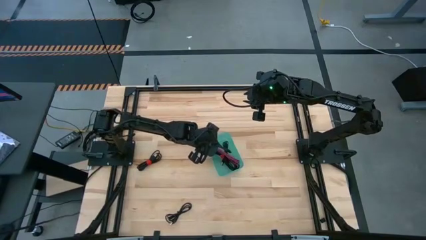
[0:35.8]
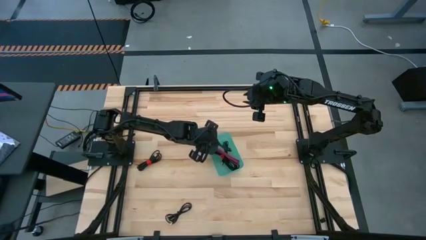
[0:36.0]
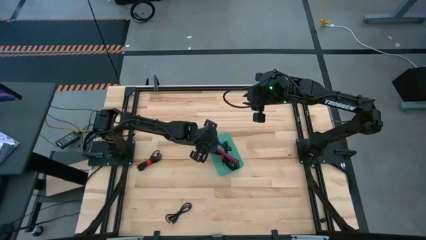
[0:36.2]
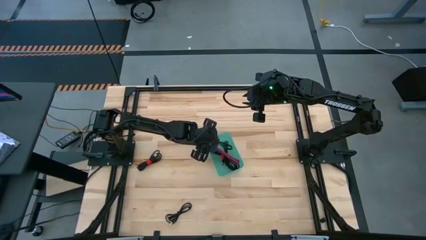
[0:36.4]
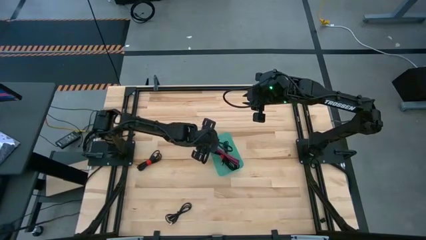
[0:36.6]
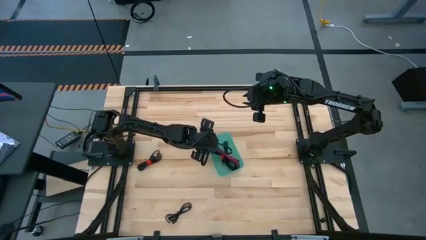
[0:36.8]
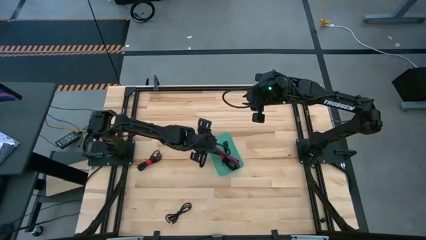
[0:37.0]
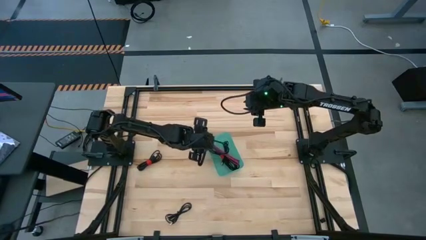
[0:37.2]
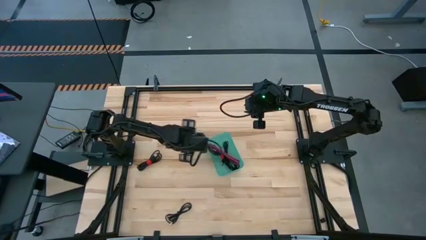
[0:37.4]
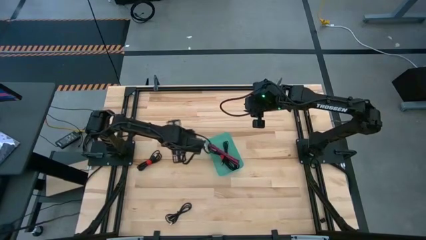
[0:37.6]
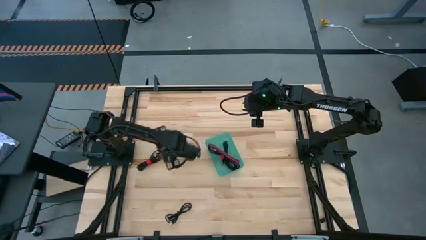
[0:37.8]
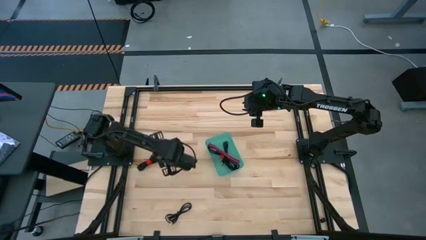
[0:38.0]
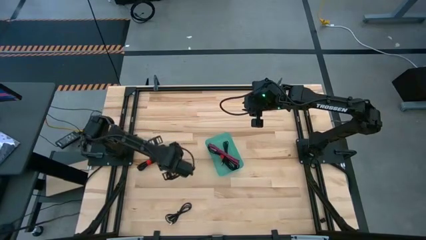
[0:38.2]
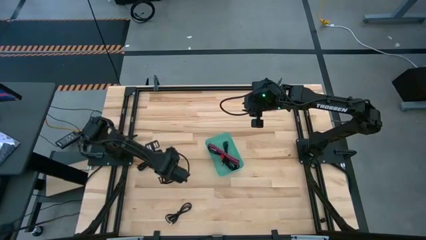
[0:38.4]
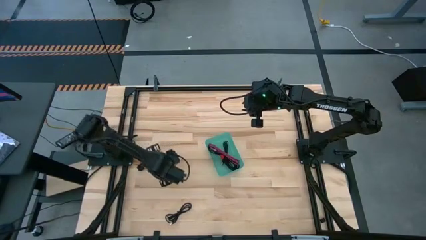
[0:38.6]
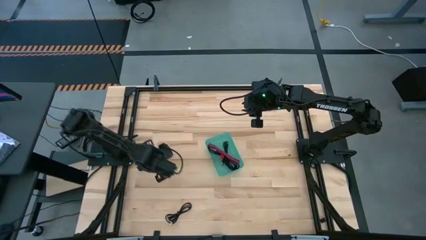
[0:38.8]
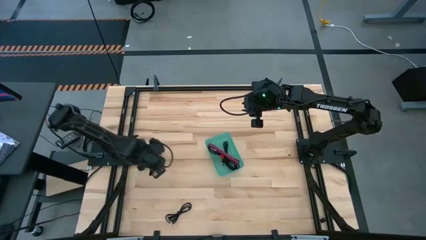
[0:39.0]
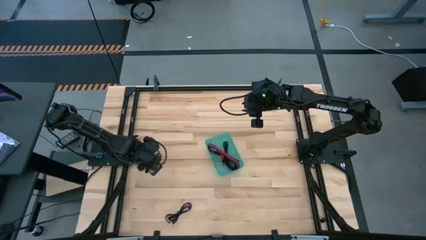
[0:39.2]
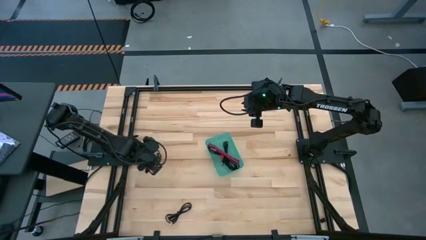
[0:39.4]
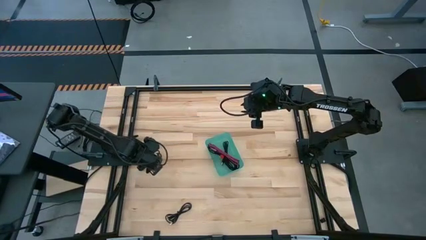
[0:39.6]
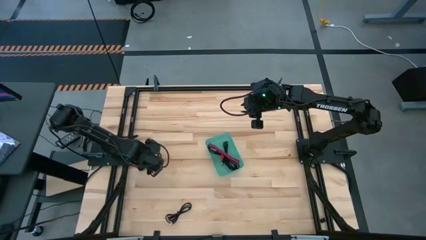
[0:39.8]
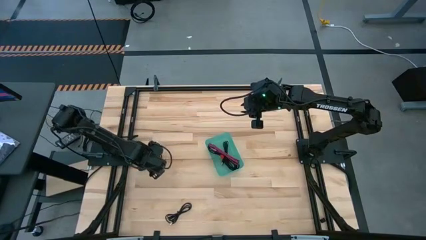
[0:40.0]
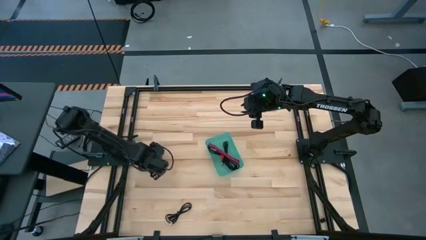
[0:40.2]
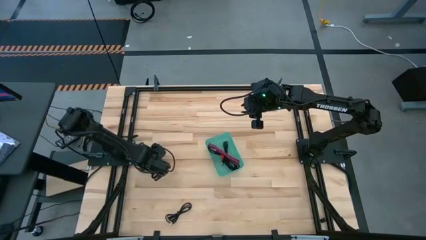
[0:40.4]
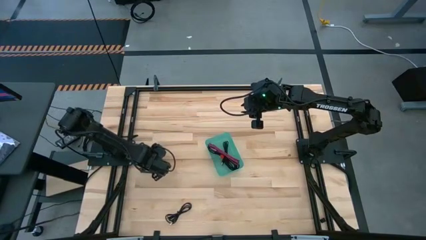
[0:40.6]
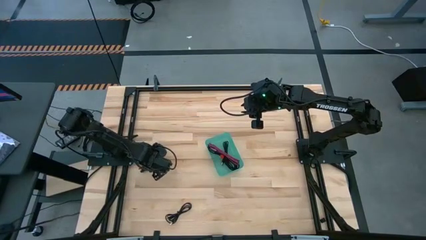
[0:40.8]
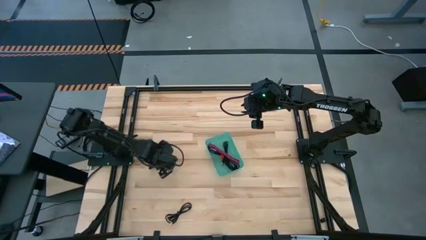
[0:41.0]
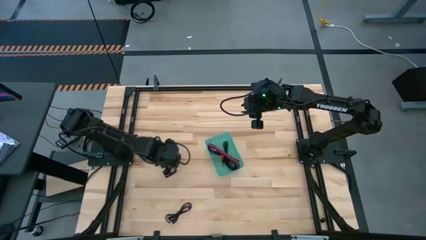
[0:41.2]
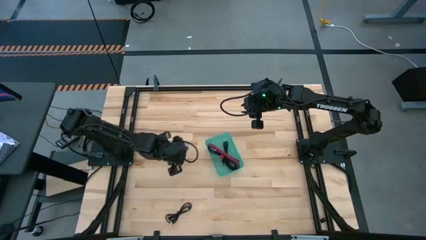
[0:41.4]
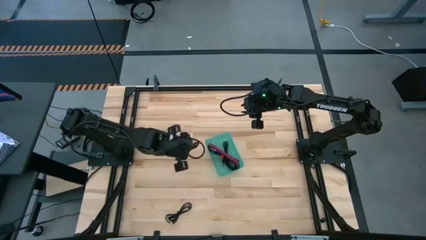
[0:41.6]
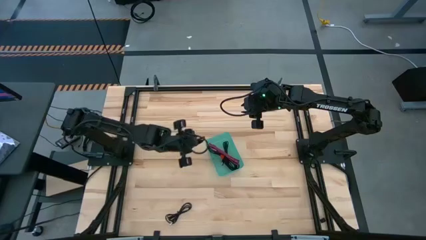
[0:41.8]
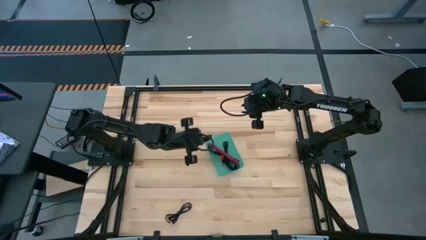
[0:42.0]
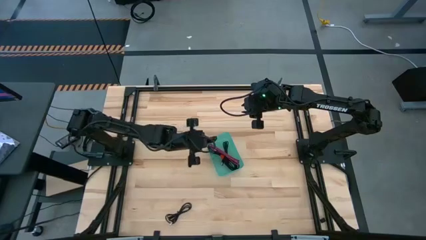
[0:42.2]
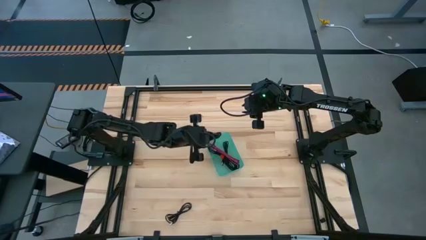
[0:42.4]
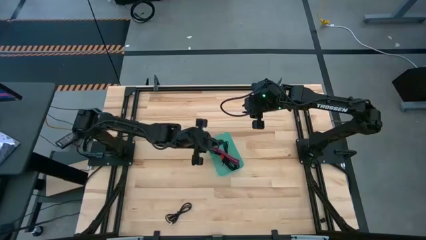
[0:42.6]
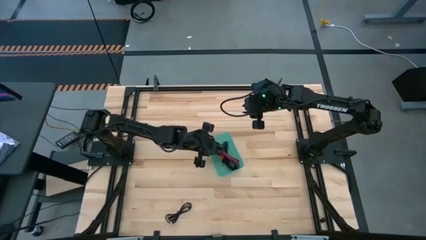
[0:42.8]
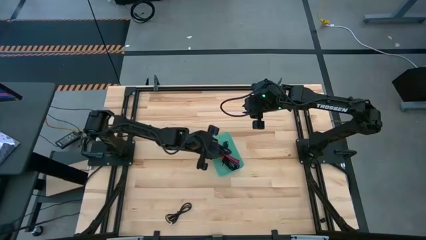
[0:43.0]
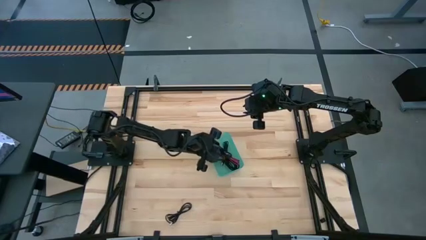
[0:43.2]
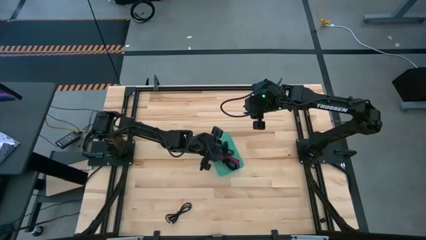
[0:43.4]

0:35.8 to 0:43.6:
Task: Pick and place USB-C Cables
Put the top black charger cable into the green bin

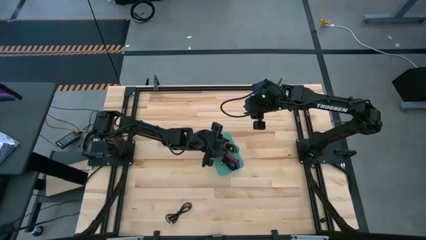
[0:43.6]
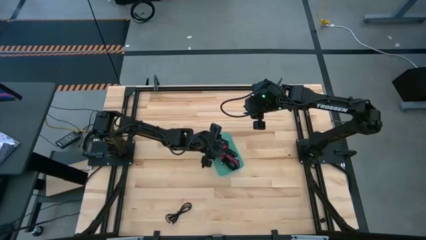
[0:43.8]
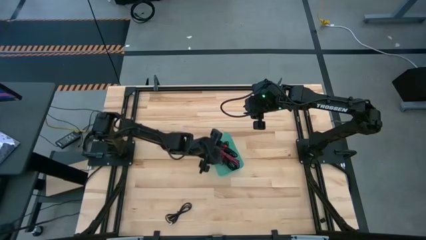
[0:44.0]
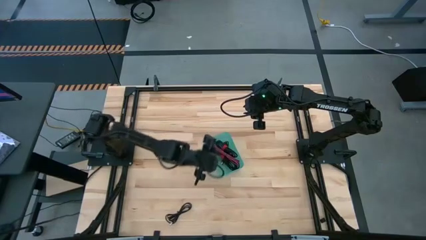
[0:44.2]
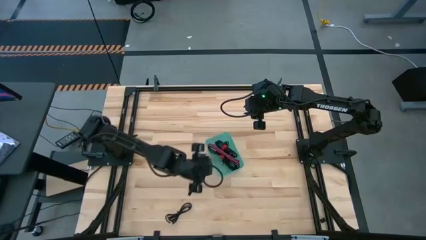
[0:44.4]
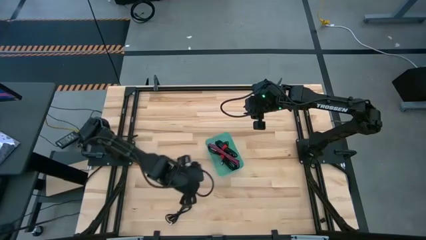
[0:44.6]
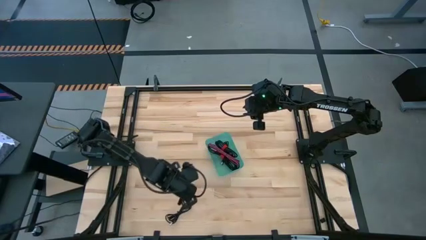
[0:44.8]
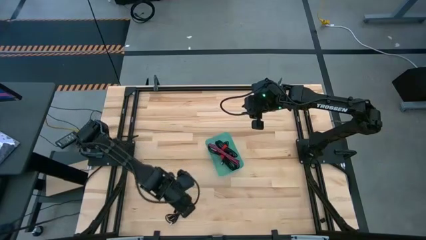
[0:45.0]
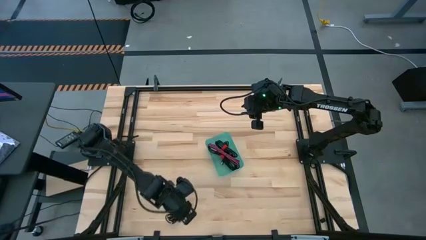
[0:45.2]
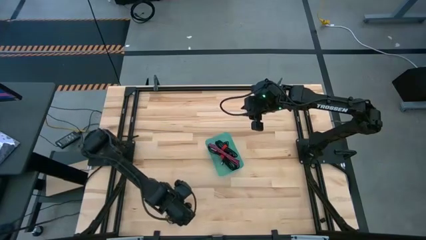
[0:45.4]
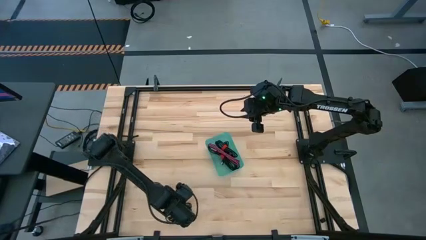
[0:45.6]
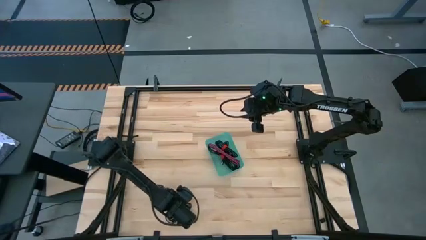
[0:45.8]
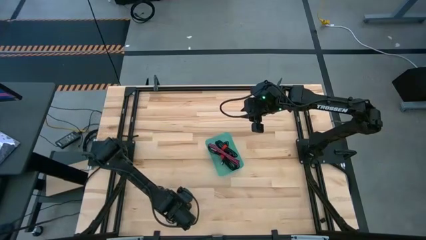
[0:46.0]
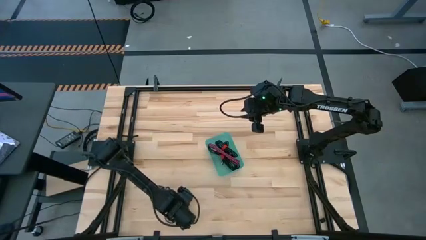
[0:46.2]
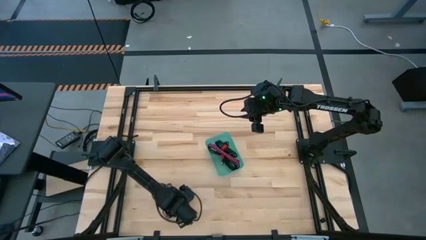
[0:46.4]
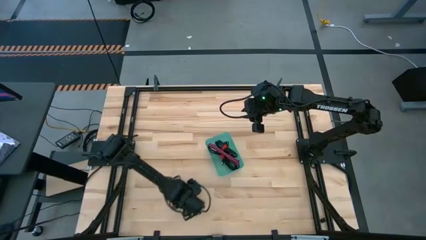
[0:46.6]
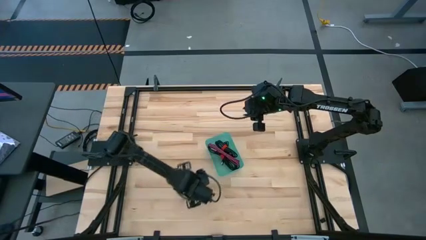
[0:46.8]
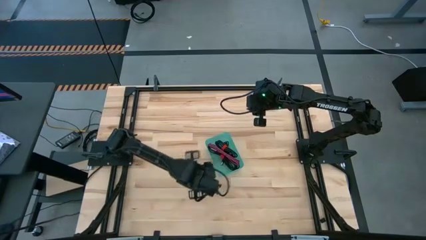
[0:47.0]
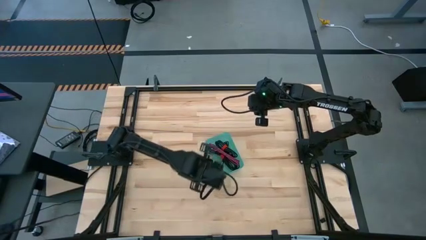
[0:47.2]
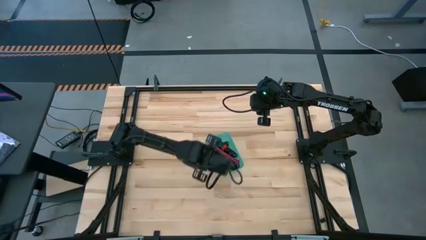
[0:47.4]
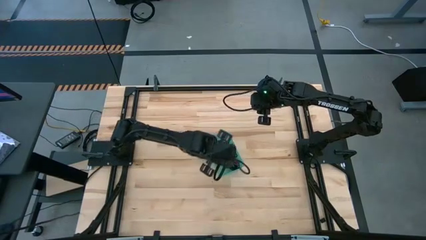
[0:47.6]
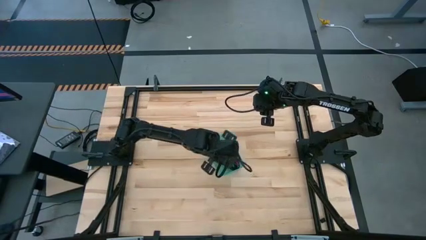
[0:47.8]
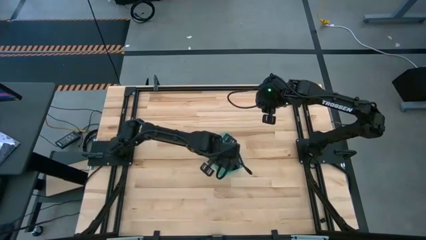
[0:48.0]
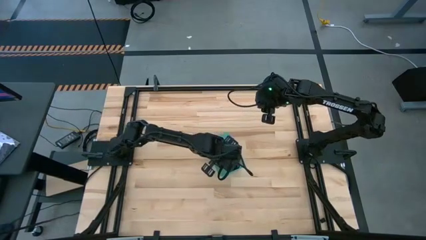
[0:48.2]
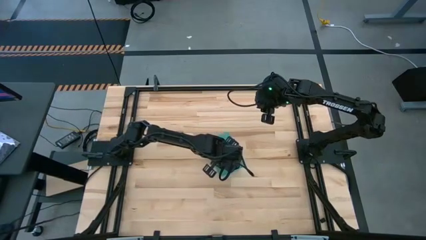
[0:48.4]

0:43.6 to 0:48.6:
Put the black charger cable into the green bin

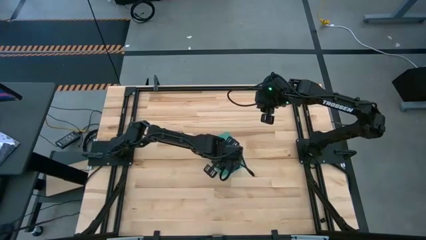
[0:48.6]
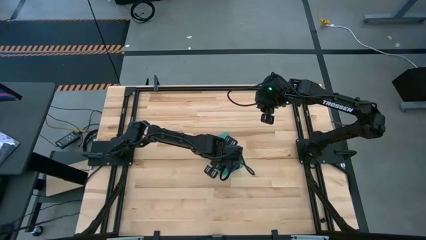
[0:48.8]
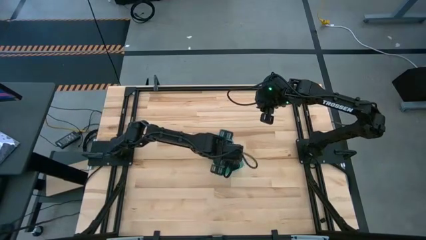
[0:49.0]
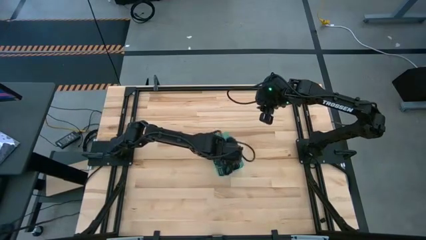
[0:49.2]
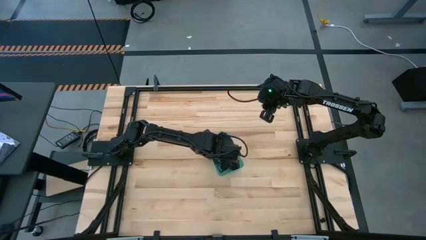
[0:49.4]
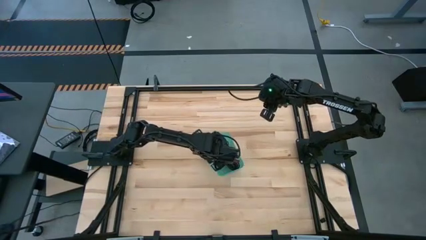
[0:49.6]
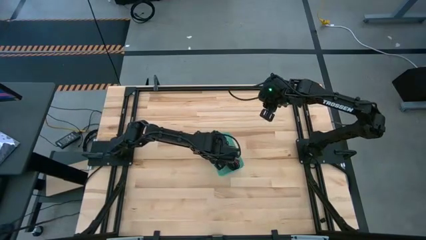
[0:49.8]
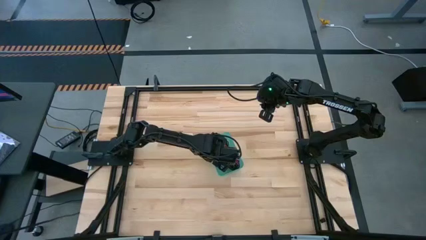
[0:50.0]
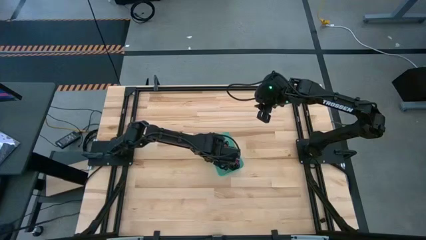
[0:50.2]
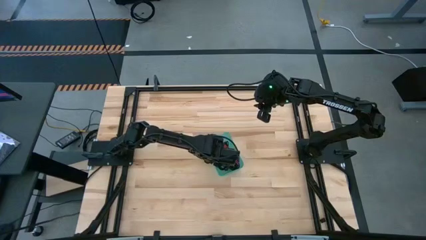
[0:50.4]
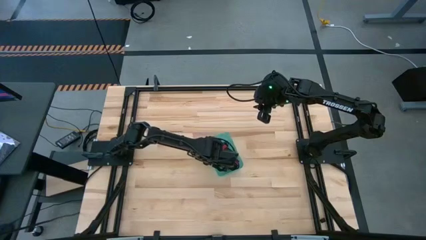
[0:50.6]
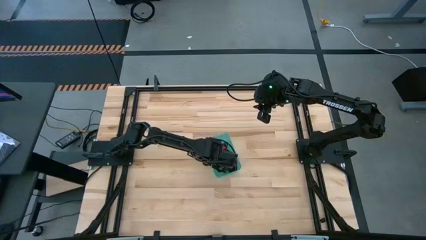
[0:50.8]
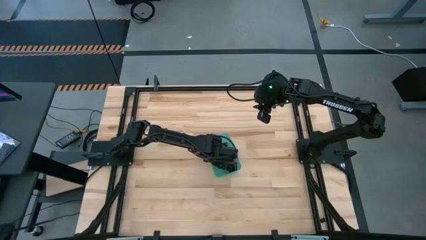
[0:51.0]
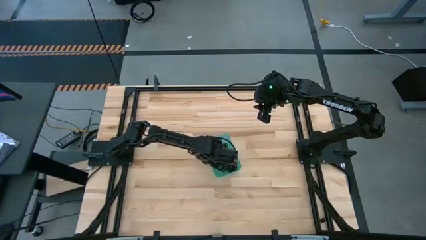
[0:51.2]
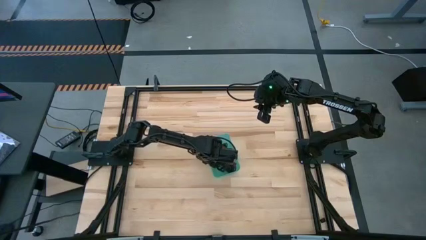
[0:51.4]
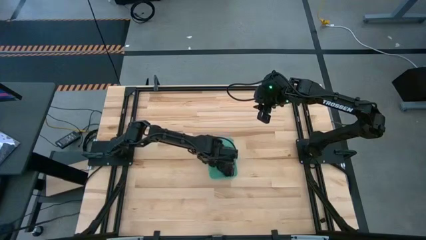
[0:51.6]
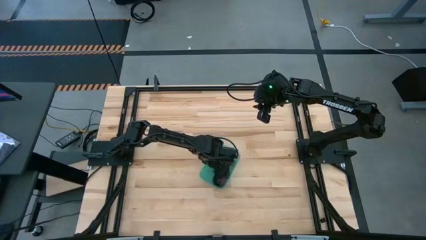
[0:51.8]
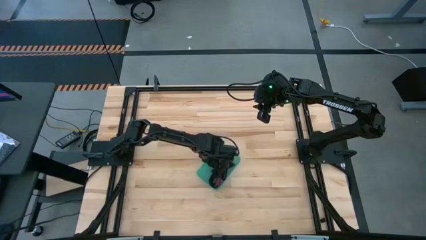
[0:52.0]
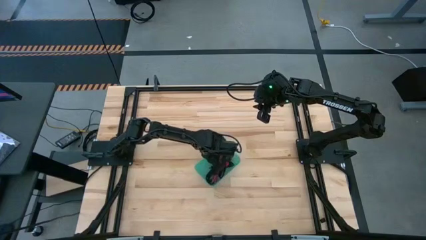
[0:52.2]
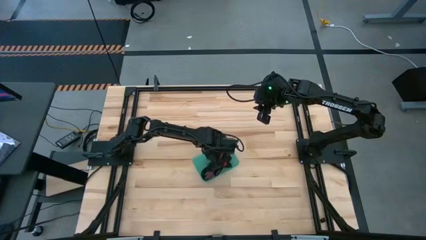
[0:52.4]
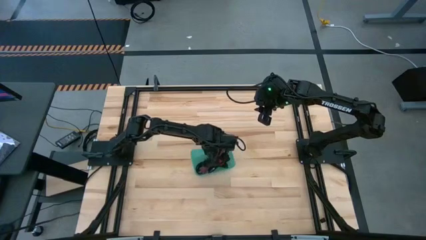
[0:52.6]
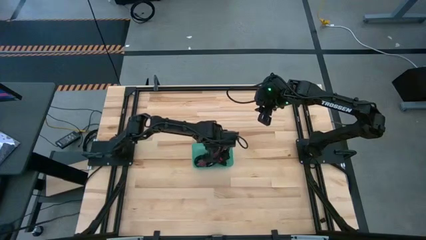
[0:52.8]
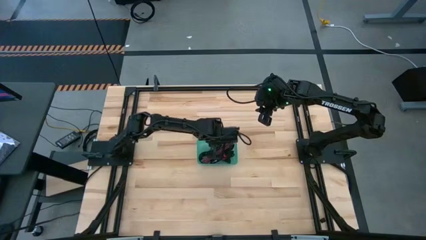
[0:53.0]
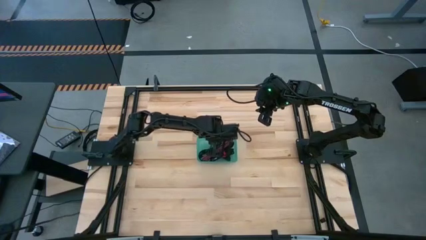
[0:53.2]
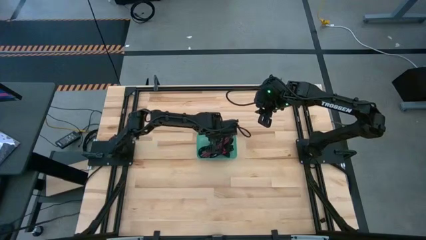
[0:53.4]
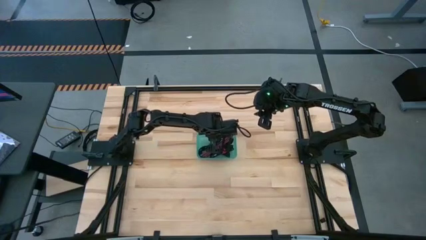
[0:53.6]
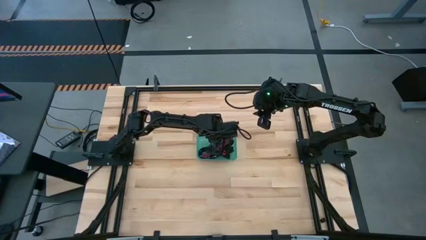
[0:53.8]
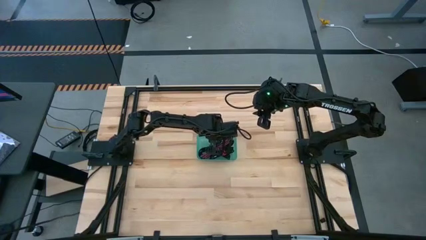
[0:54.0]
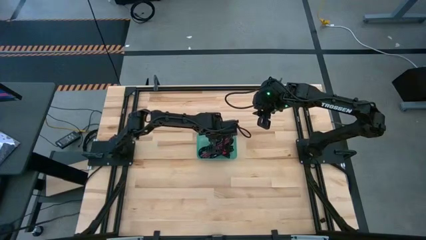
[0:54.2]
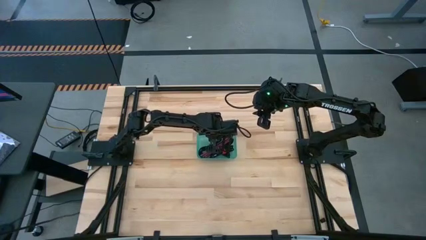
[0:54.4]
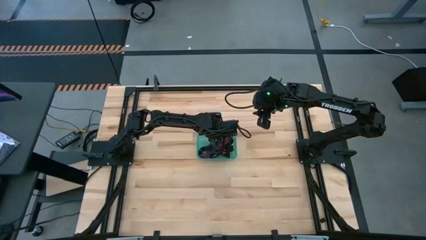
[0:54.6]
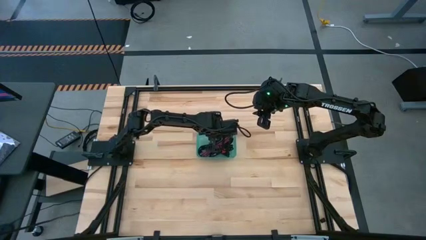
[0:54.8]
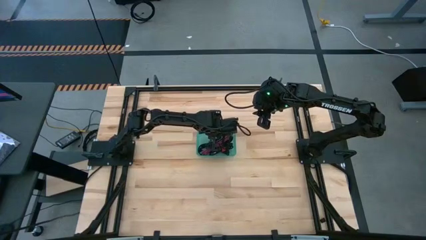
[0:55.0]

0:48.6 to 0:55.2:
Adjust the green bin
